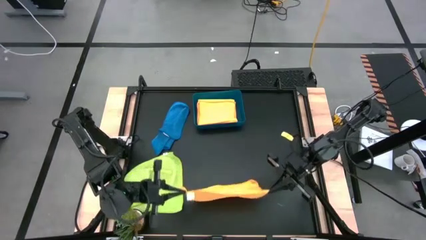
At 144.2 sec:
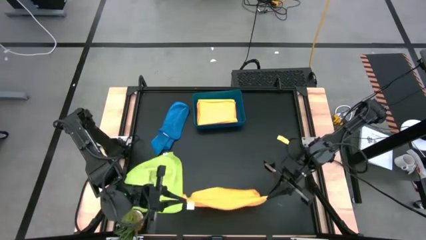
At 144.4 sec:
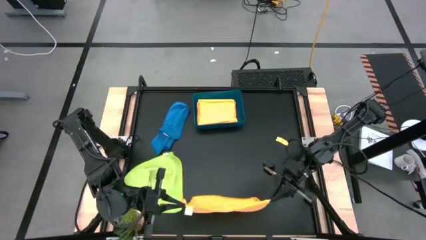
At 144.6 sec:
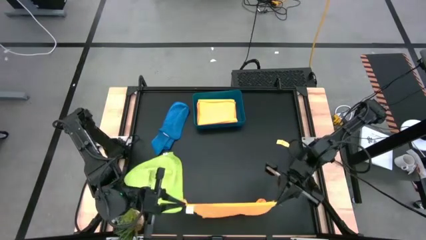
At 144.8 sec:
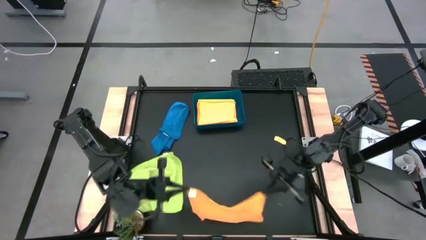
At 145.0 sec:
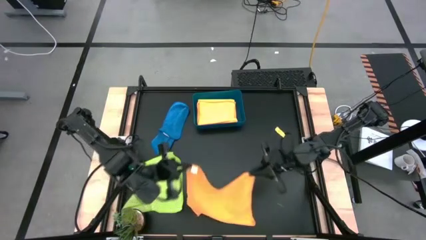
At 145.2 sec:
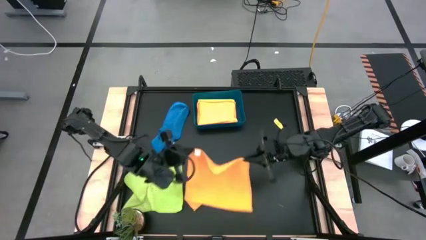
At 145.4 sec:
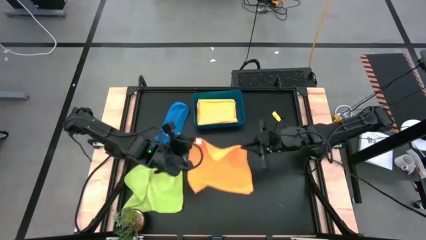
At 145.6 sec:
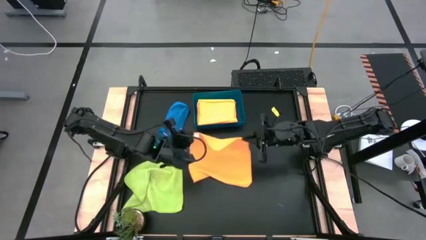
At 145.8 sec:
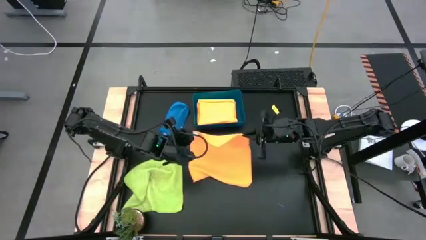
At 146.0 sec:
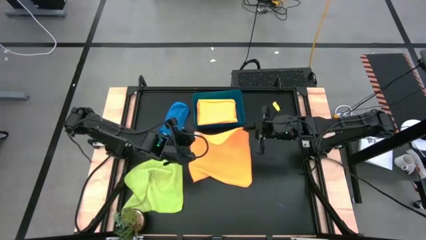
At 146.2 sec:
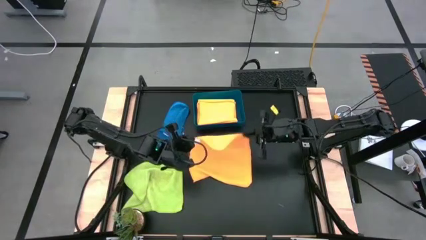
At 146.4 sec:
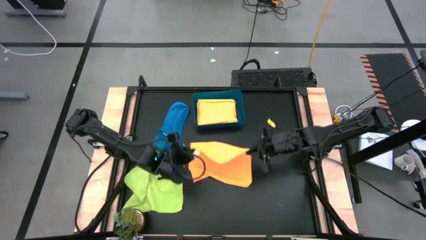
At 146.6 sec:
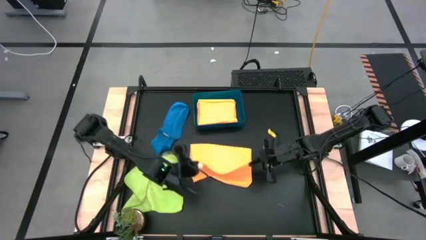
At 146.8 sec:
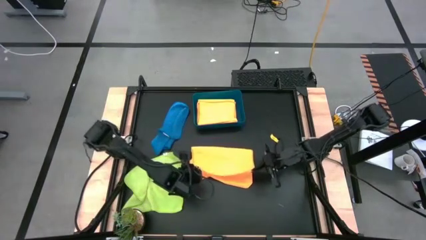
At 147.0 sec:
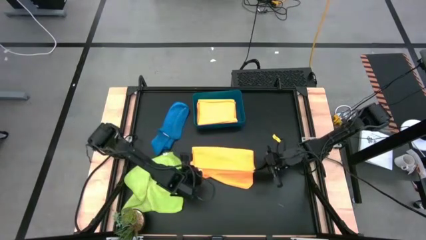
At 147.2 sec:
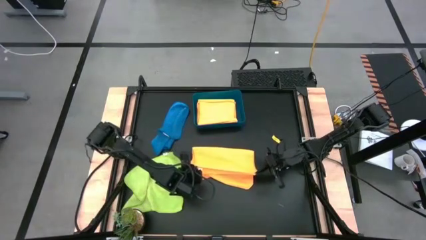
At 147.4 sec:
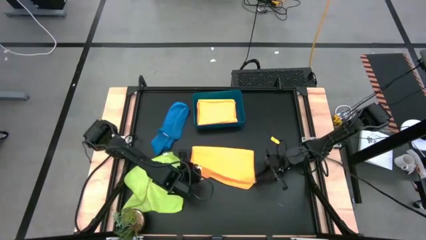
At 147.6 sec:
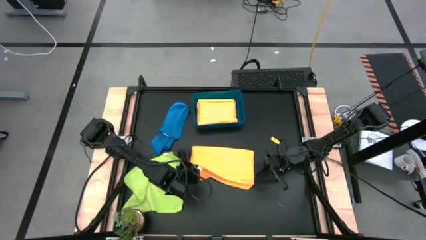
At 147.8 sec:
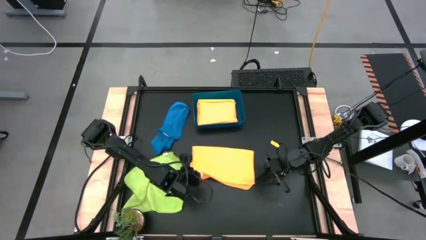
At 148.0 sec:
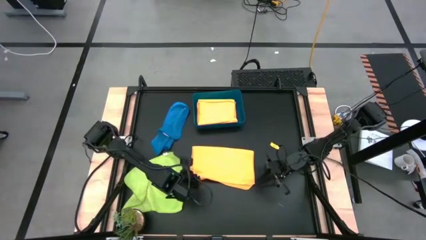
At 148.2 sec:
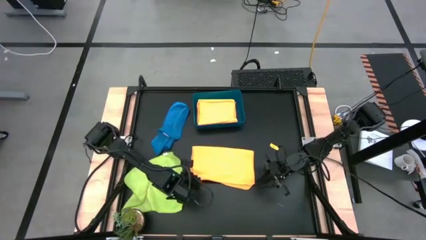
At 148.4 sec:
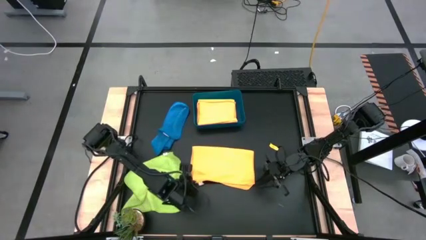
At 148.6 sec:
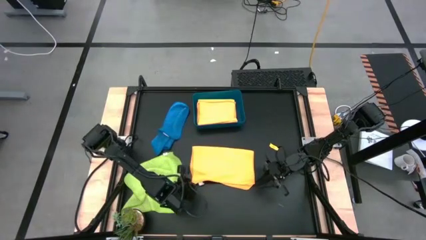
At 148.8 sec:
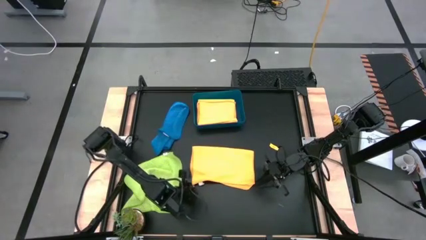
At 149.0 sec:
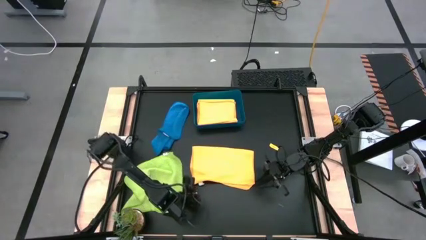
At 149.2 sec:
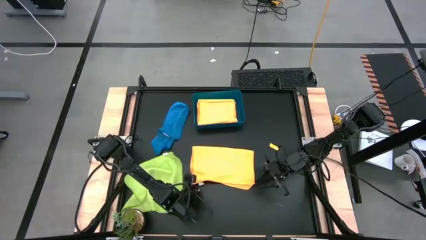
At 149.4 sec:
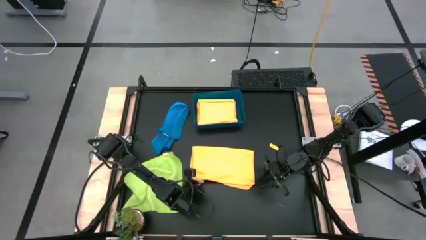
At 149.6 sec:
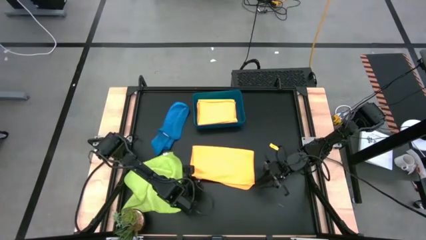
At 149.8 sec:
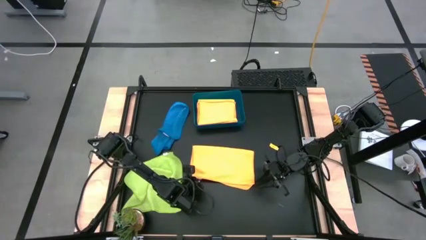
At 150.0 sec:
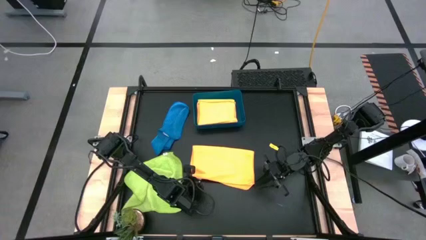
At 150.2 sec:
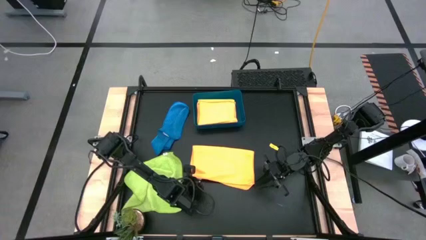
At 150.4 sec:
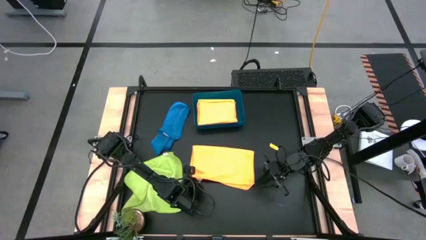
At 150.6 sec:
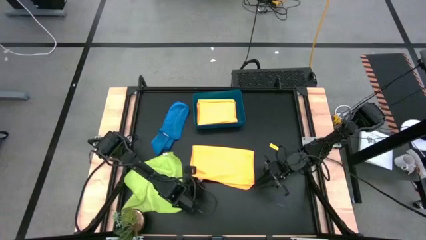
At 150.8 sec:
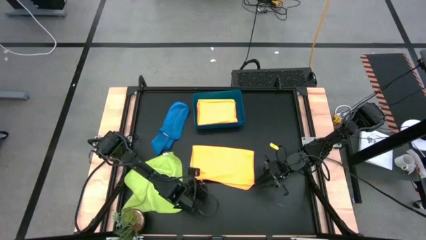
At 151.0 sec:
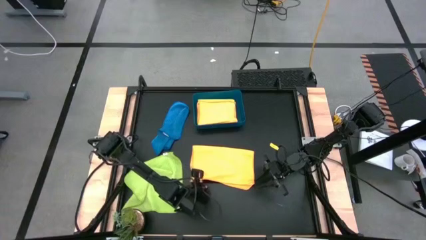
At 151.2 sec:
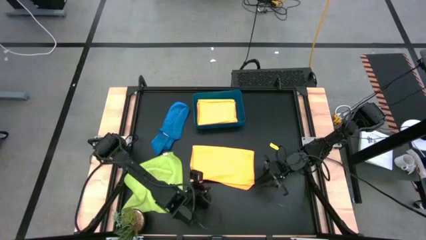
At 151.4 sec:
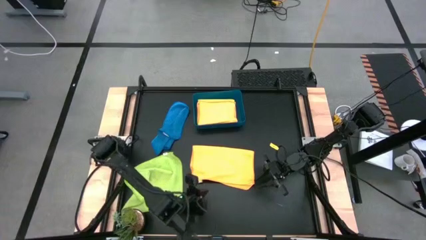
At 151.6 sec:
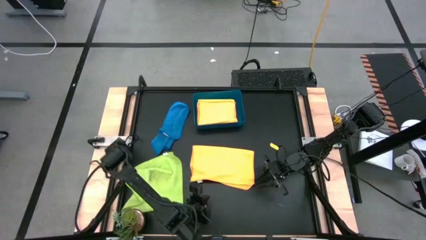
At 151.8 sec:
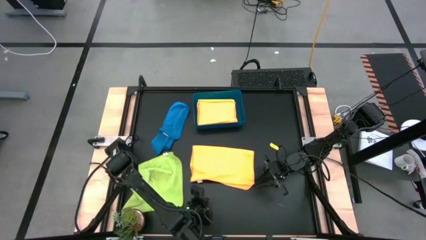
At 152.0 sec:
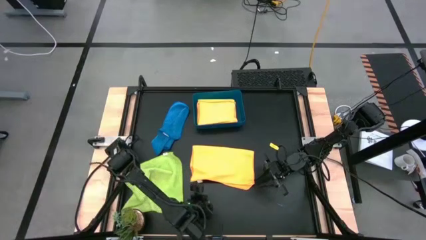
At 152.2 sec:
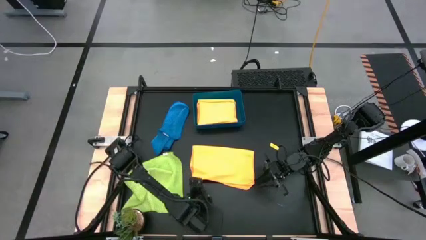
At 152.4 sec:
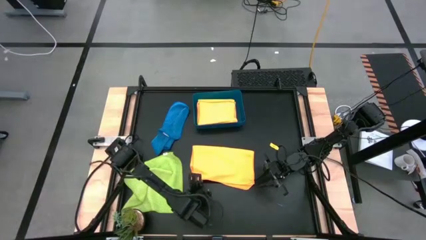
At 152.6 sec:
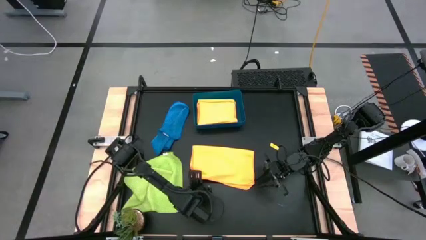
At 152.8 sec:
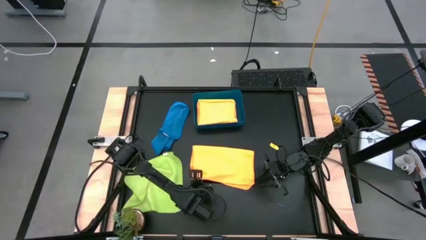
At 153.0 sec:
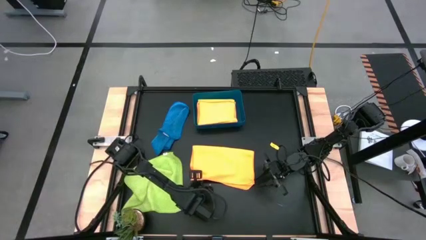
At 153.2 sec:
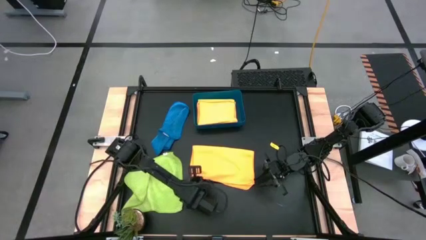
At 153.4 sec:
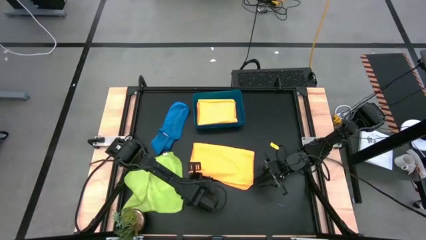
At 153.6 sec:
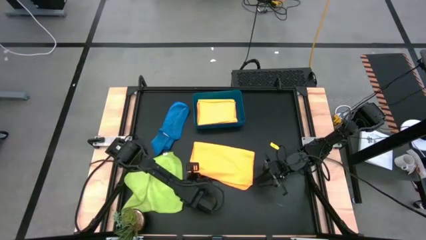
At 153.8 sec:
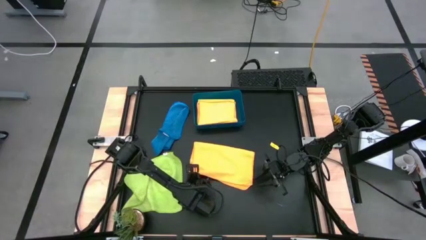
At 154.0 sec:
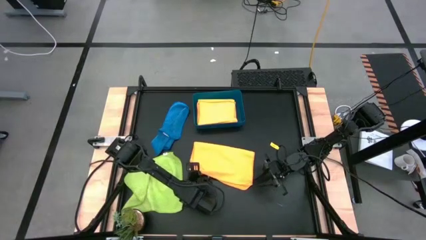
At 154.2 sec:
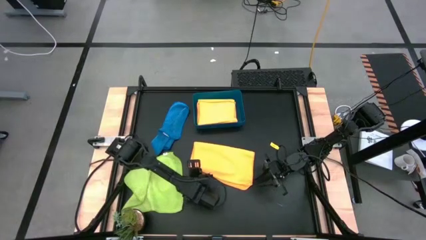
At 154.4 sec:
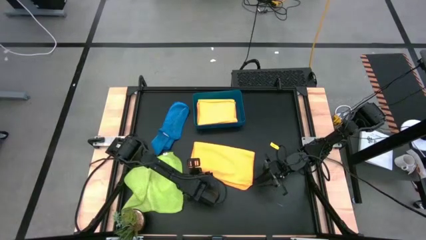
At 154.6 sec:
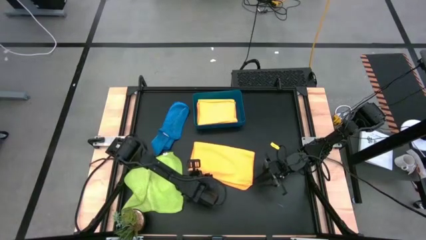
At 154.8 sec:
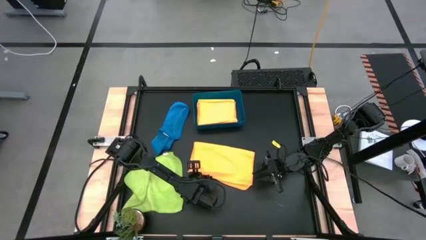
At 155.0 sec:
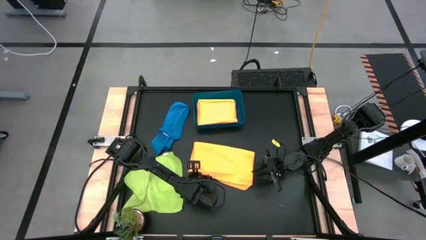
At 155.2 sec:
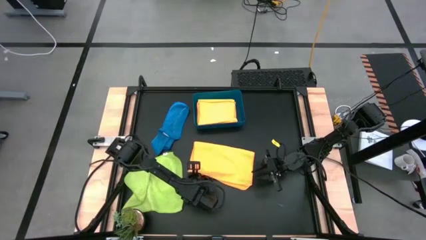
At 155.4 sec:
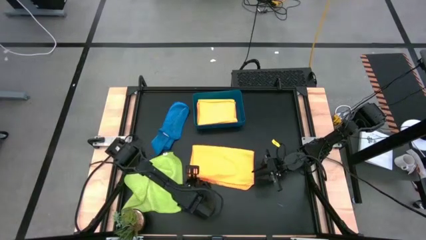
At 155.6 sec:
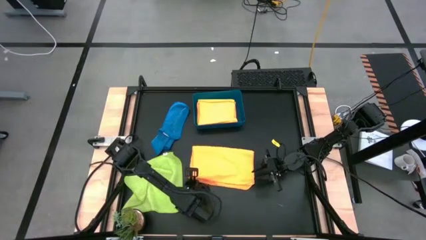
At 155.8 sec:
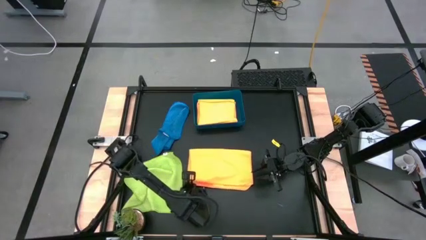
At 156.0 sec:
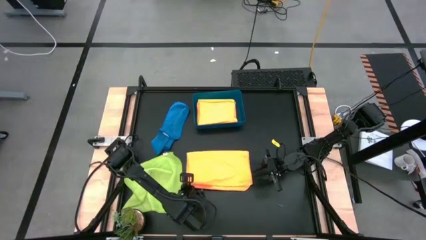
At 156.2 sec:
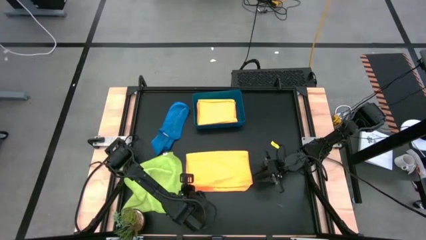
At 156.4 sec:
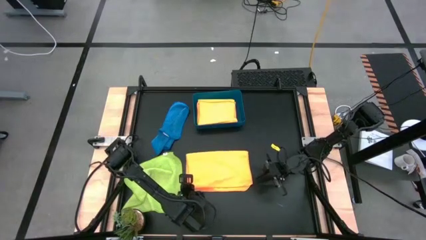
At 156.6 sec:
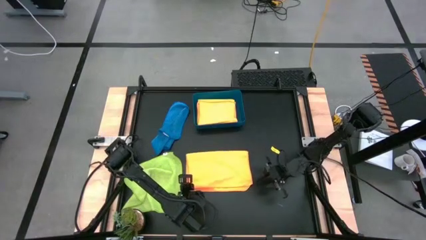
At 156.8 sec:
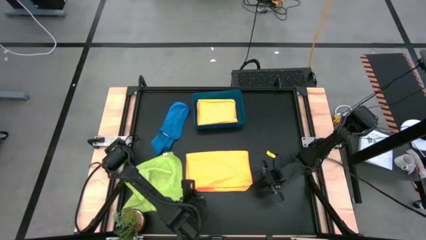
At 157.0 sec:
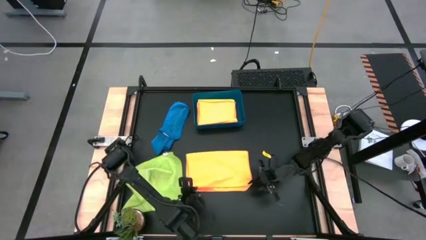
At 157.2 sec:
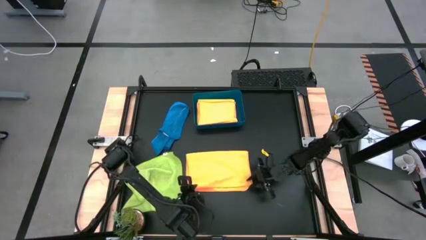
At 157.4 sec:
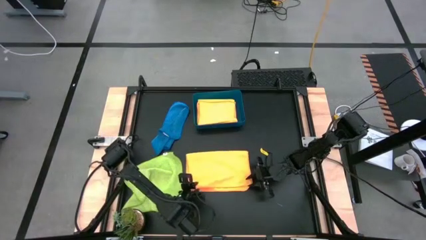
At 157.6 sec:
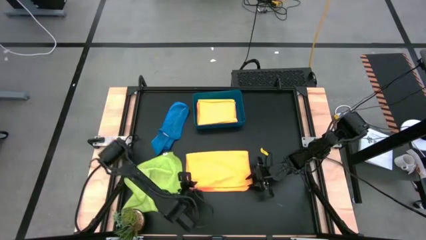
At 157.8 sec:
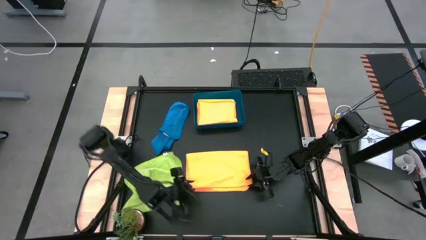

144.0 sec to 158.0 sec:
Task: Fold microfiber towels
Fold the orange microfiber cloth
